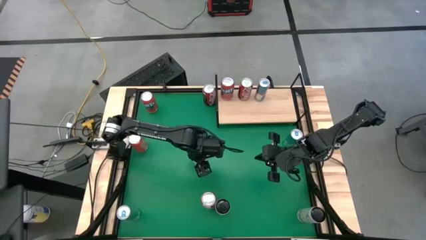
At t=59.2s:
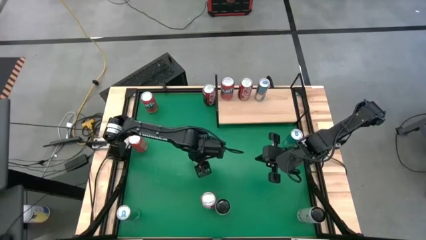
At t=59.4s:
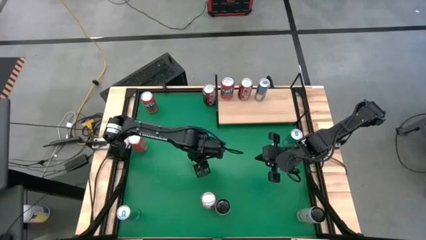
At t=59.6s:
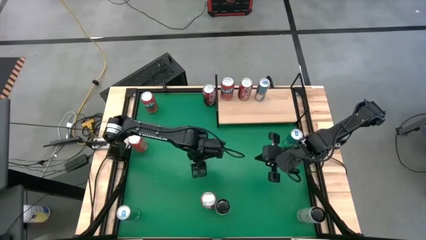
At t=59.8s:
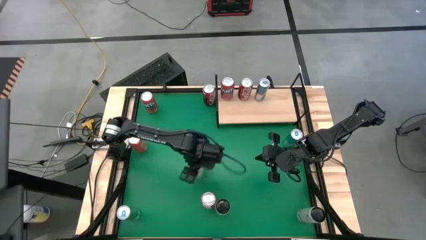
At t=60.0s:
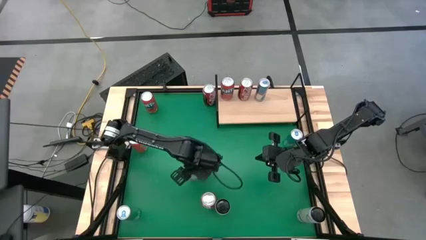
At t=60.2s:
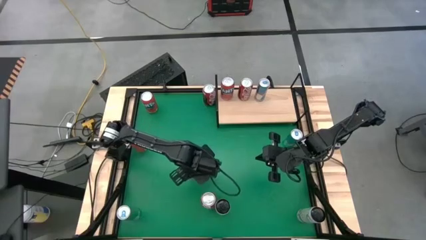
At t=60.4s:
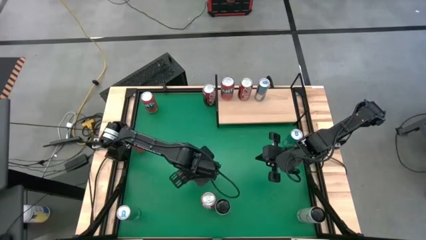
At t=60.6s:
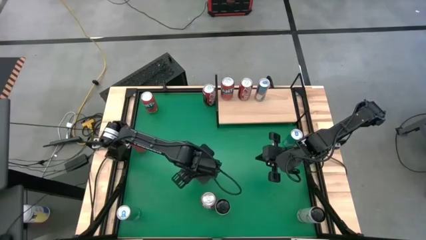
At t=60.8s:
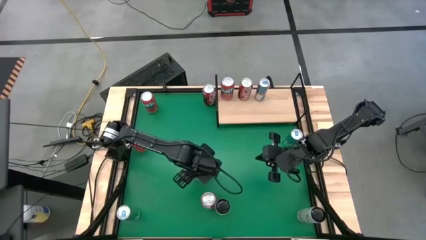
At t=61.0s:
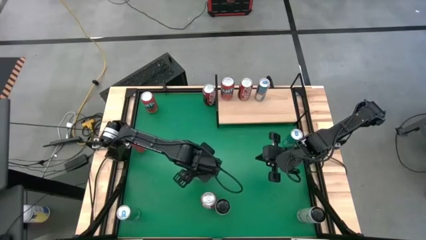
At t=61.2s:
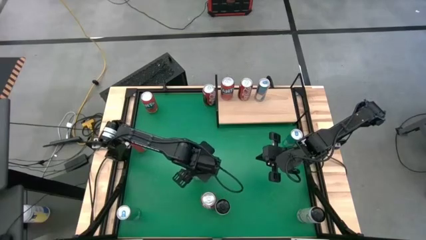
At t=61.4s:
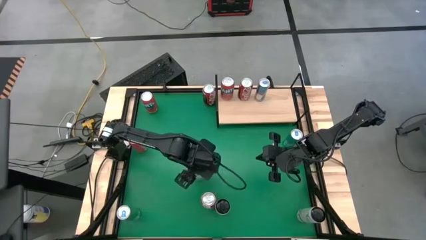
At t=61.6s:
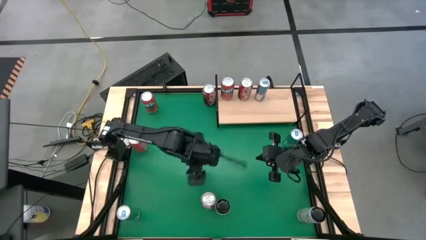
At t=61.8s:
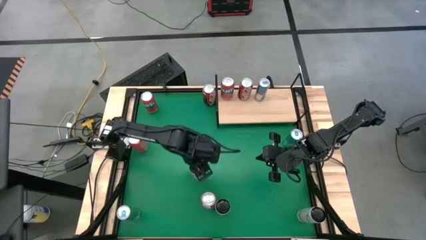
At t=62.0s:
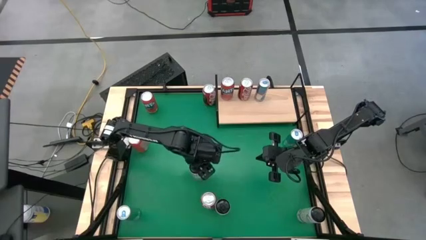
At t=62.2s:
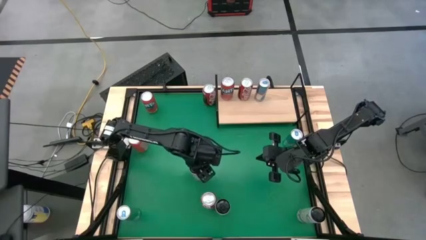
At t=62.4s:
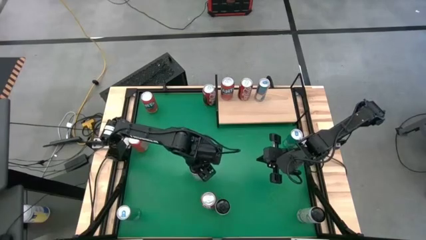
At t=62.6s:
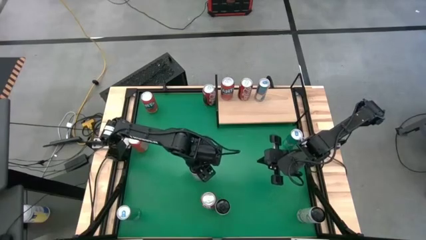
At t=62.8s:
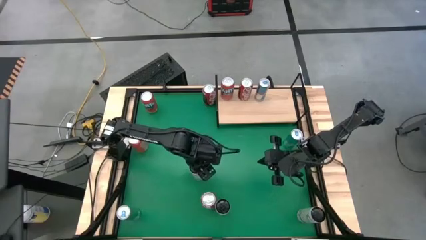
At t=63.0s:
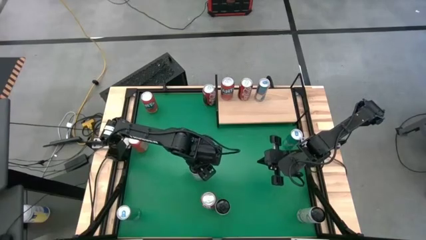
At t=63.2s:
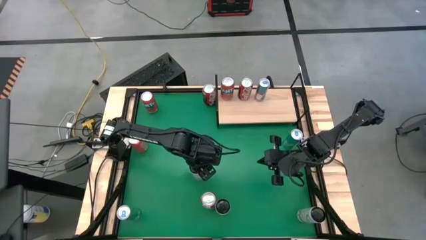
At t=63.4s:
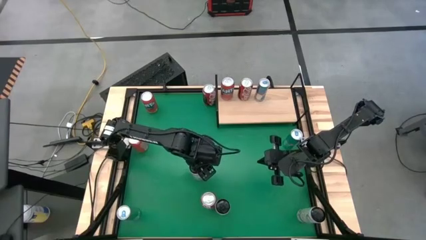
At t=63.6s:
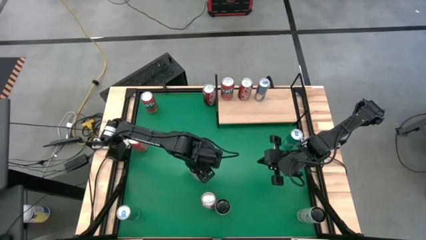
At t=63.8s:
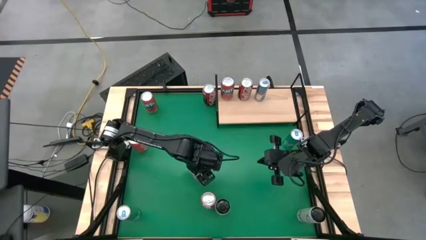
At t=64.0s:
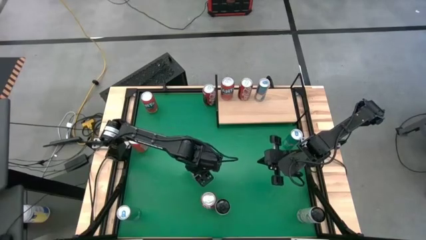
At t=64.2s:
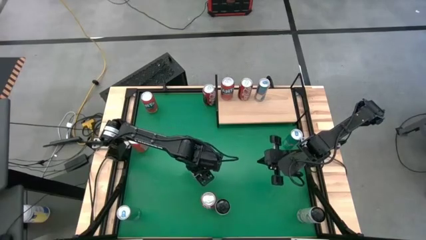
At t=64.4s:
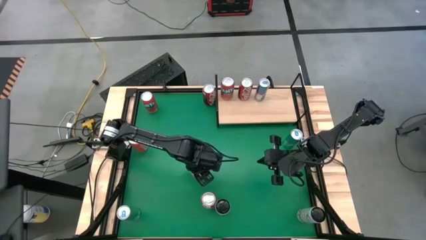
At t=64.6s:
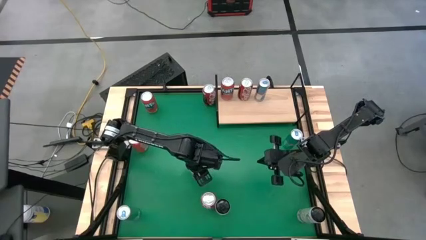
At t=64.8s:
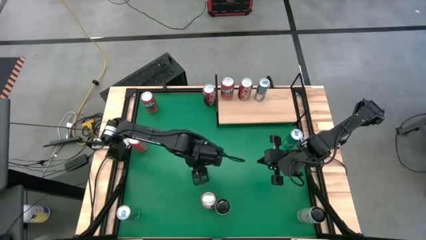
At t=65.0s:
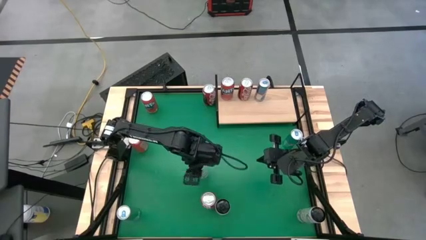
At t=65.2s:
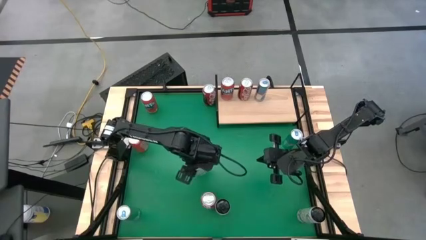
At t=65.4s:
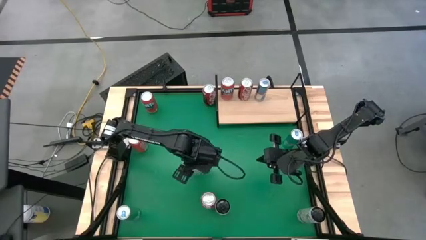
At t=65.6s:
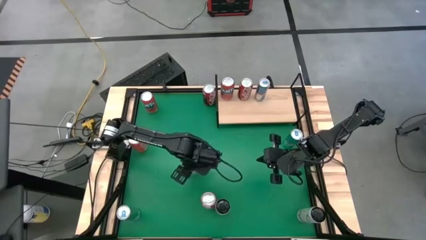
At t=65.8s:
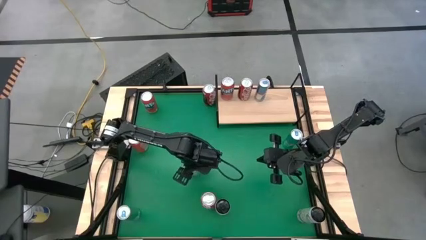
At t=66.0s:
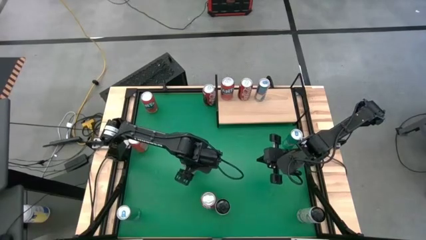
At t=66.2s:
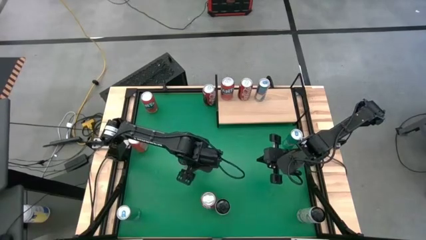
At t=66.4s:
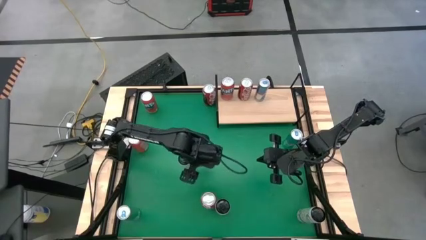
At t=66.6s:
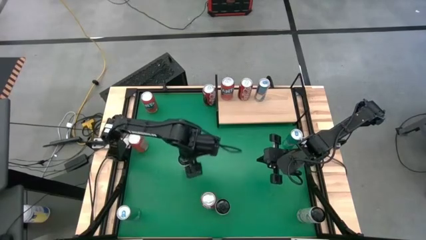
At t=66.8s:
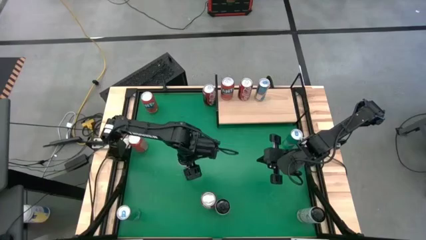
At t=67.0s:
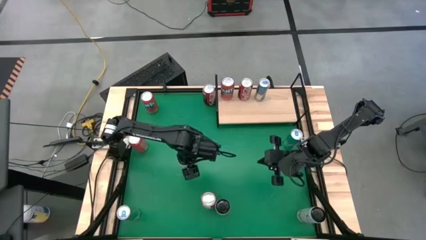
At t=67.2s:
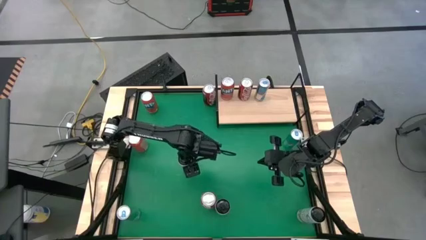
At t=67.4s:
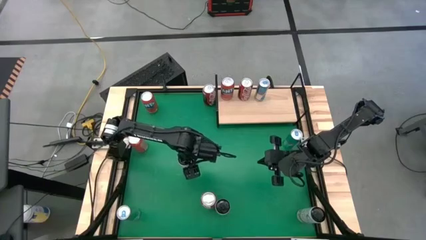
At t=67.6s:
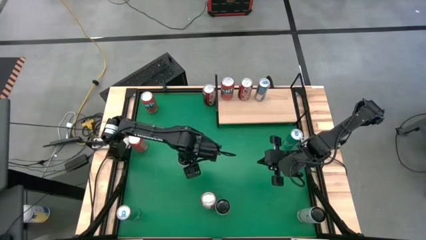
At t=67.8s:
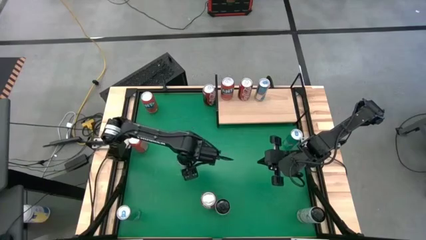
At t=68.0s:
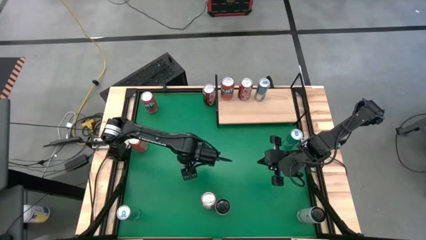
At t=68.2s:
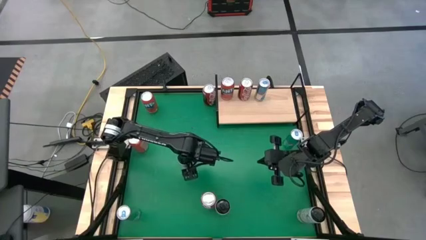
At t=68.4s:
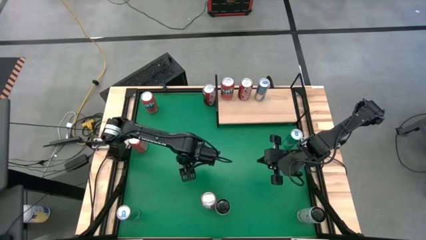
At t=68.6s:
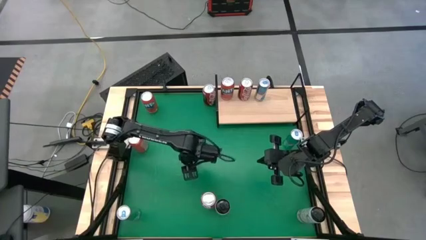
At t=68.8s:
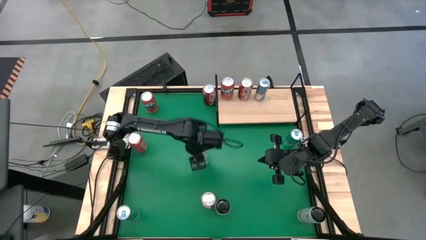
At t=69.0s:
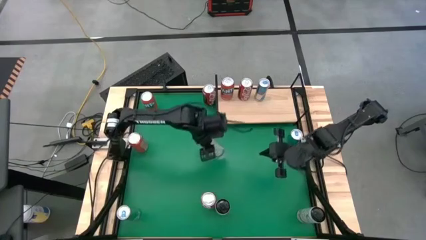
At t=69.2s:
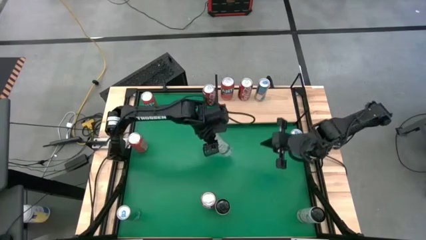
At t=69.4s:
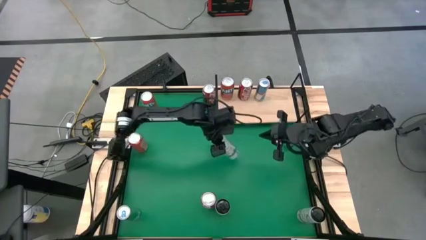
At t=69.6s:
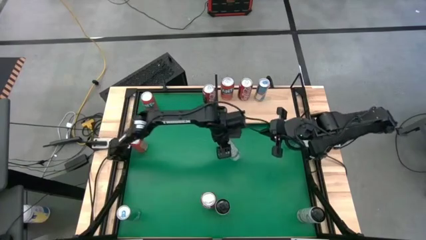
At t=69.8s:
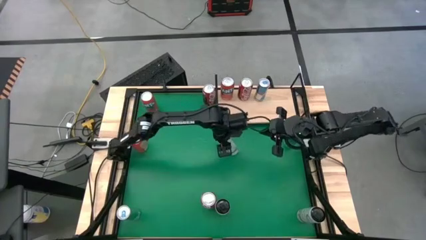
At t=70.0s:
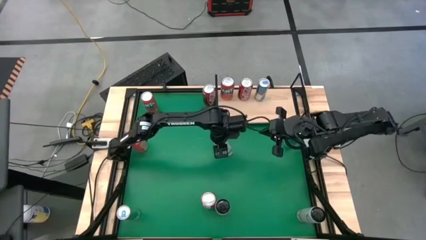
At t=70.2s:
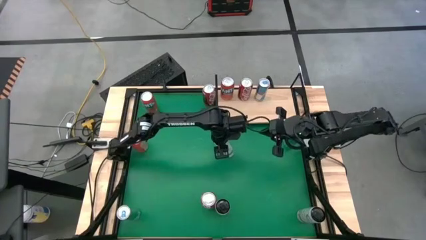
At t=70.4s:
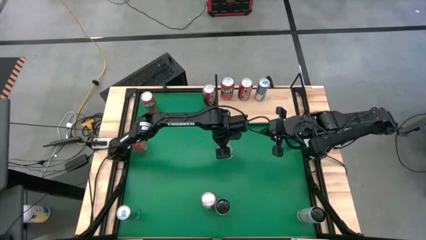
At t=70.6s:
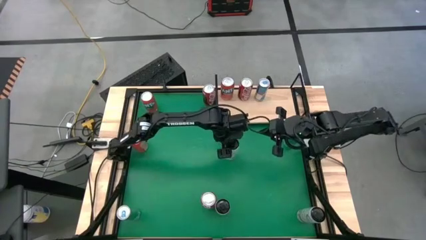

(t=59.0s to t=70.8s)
Task: Place canned beverage on shelf
Move the top left yellow soda can to the center of the table
